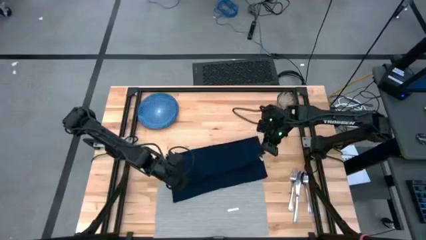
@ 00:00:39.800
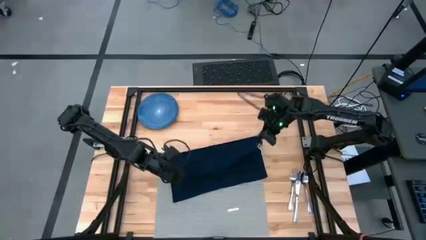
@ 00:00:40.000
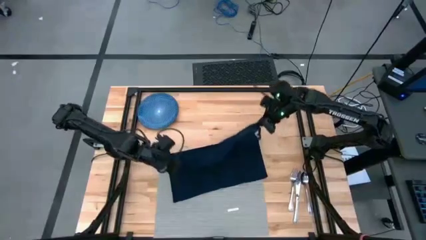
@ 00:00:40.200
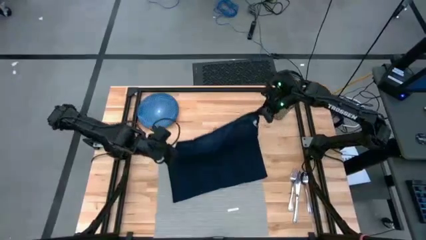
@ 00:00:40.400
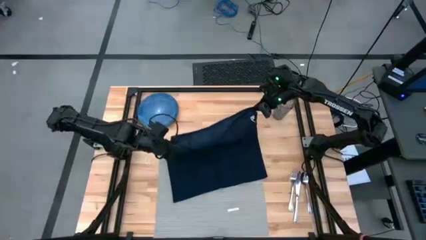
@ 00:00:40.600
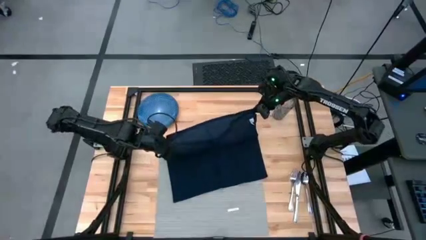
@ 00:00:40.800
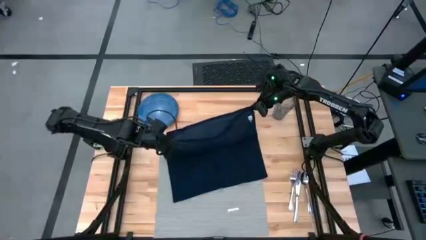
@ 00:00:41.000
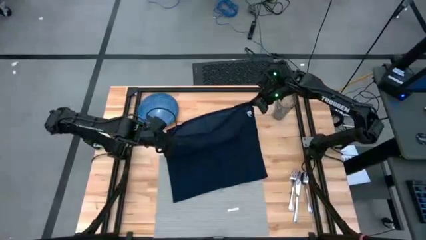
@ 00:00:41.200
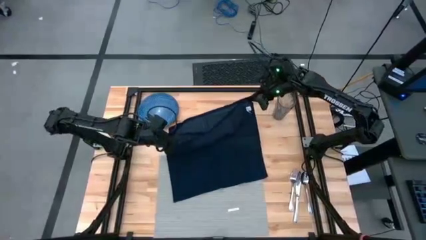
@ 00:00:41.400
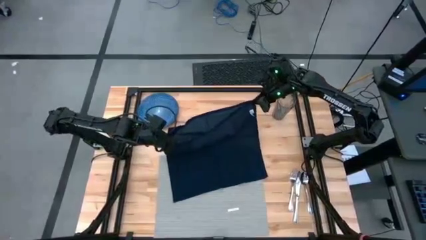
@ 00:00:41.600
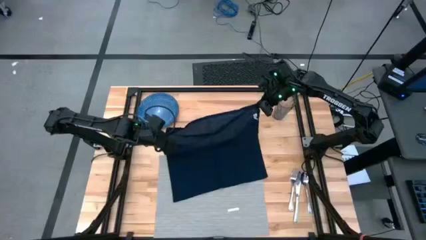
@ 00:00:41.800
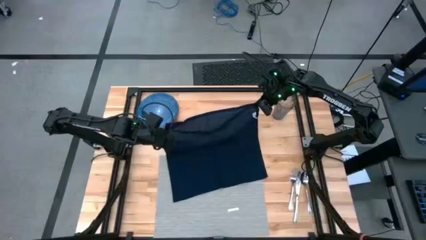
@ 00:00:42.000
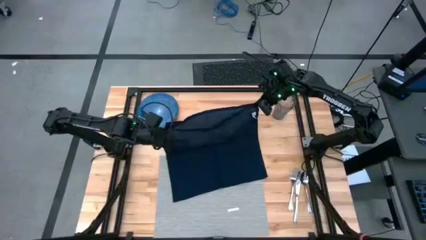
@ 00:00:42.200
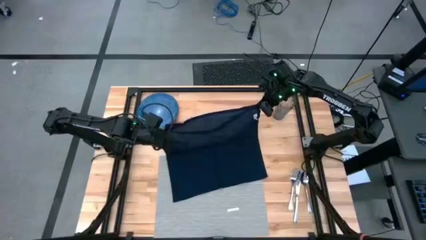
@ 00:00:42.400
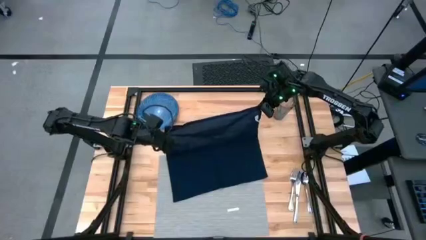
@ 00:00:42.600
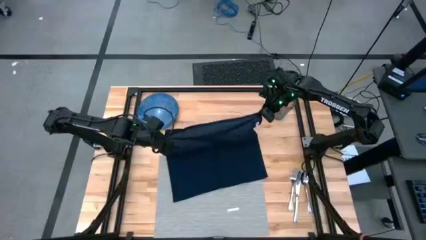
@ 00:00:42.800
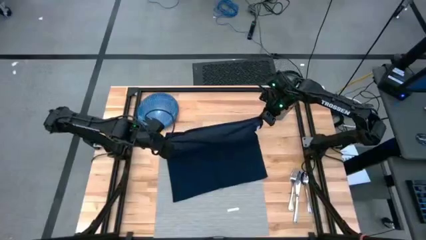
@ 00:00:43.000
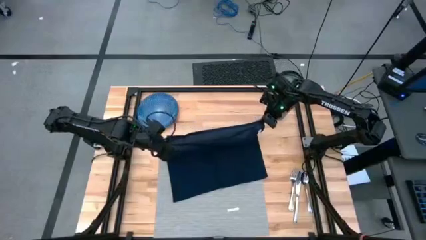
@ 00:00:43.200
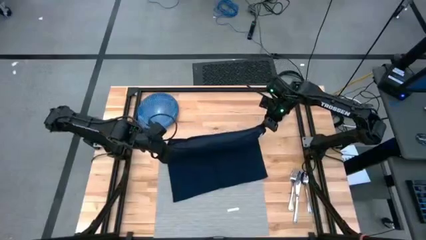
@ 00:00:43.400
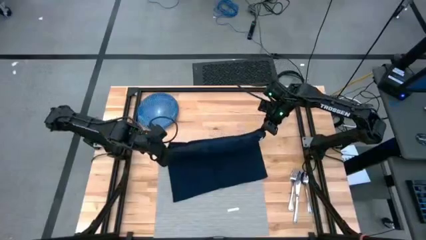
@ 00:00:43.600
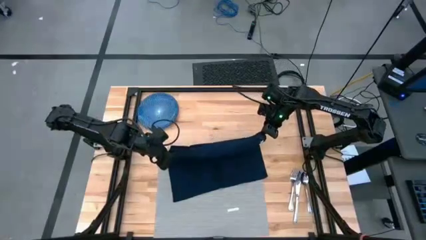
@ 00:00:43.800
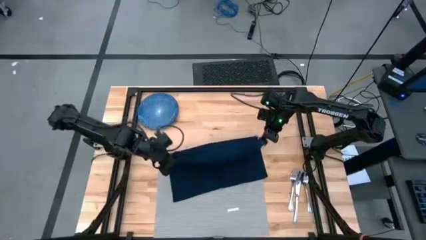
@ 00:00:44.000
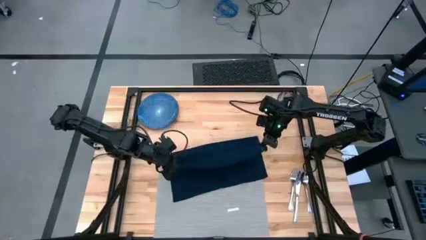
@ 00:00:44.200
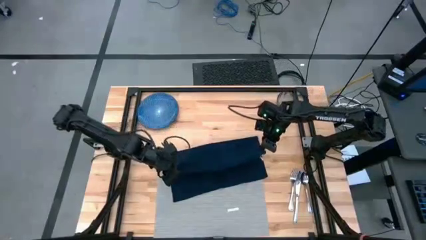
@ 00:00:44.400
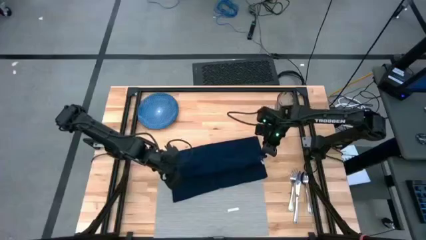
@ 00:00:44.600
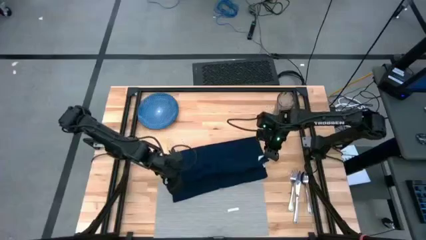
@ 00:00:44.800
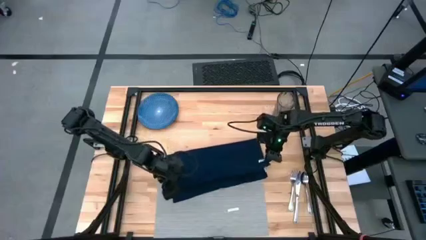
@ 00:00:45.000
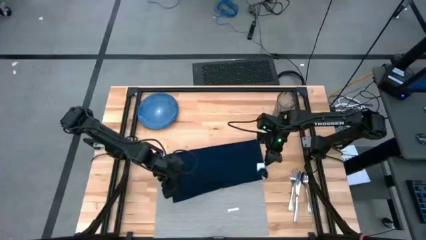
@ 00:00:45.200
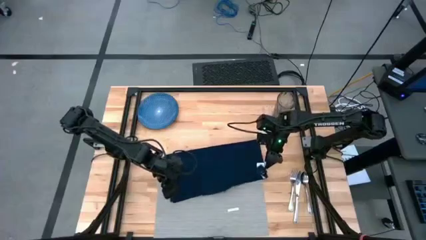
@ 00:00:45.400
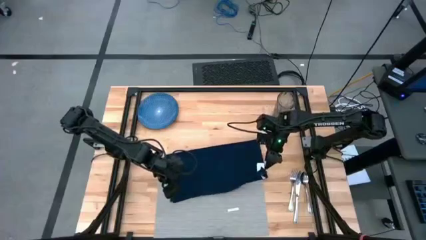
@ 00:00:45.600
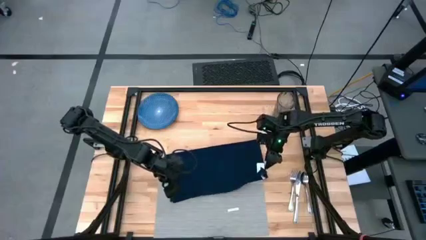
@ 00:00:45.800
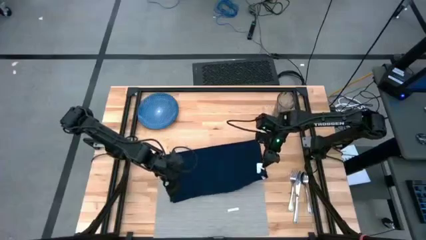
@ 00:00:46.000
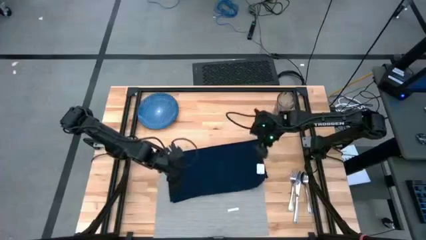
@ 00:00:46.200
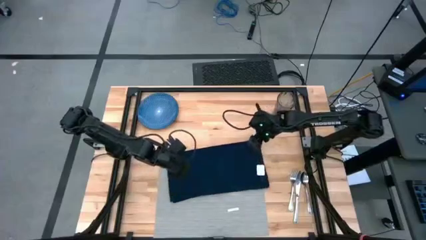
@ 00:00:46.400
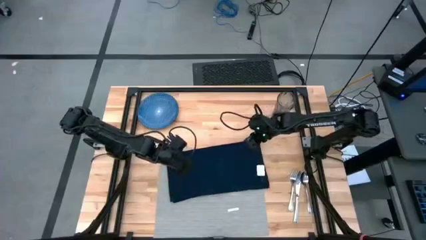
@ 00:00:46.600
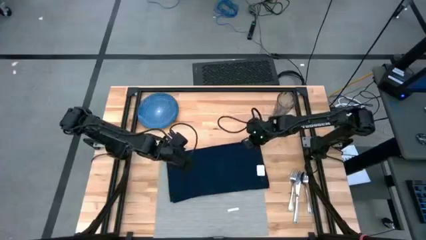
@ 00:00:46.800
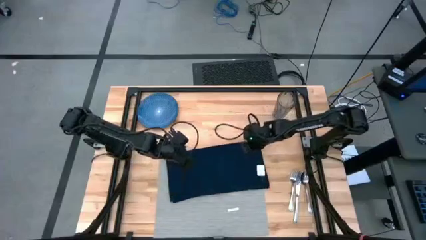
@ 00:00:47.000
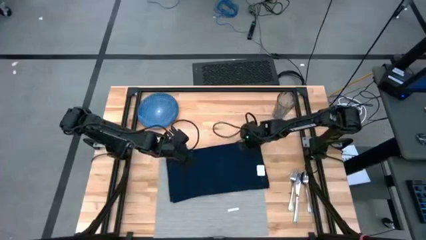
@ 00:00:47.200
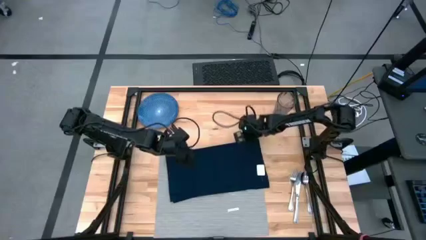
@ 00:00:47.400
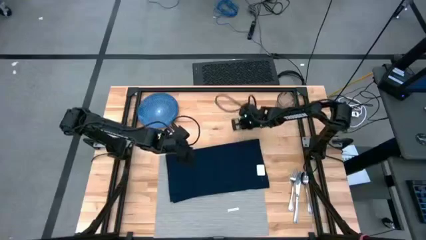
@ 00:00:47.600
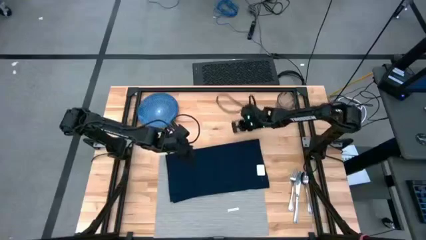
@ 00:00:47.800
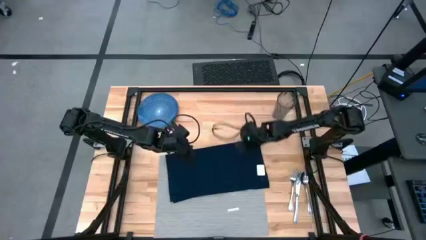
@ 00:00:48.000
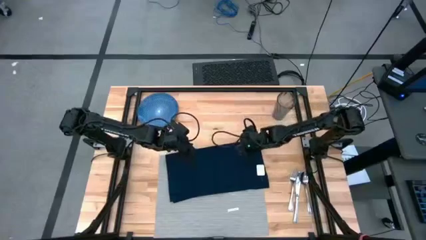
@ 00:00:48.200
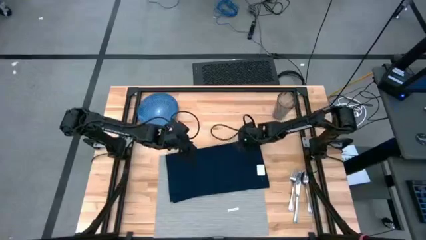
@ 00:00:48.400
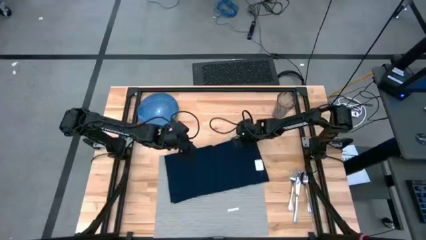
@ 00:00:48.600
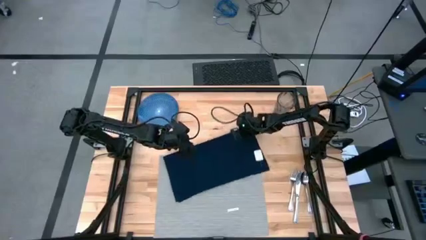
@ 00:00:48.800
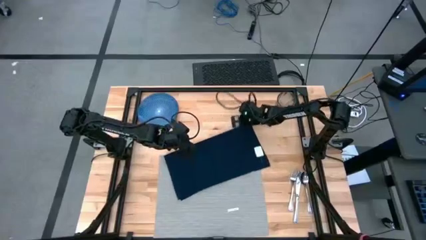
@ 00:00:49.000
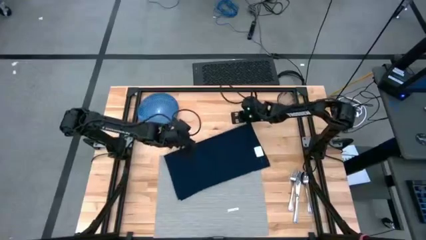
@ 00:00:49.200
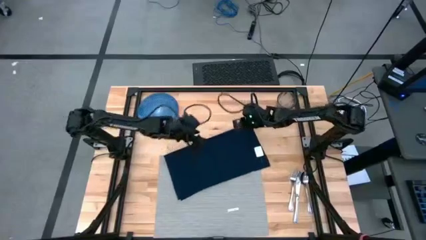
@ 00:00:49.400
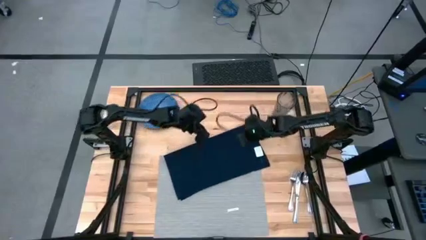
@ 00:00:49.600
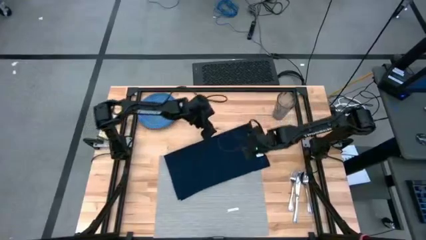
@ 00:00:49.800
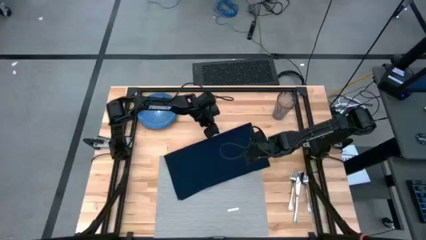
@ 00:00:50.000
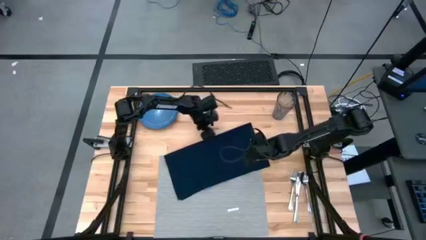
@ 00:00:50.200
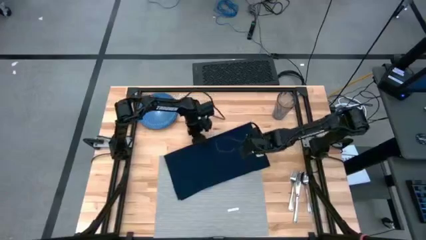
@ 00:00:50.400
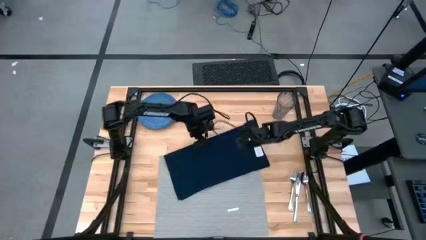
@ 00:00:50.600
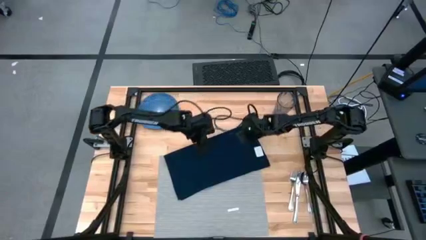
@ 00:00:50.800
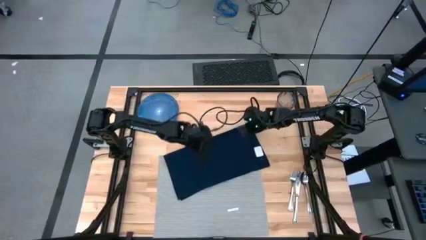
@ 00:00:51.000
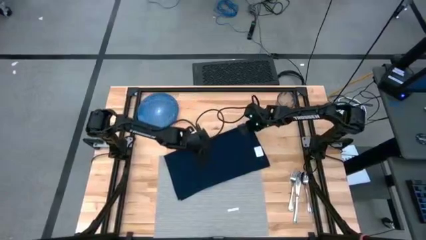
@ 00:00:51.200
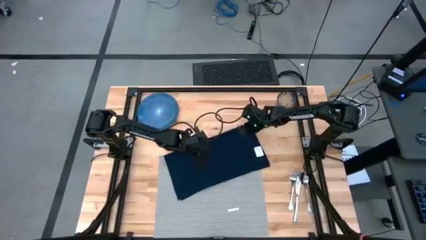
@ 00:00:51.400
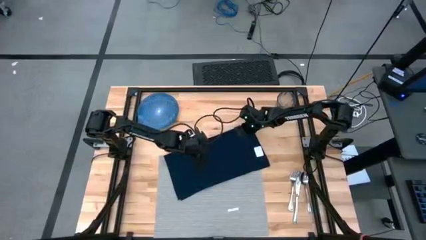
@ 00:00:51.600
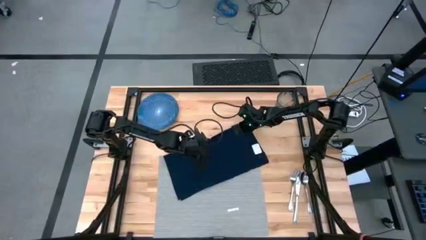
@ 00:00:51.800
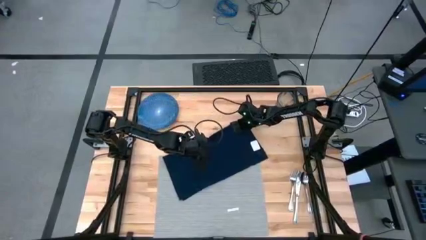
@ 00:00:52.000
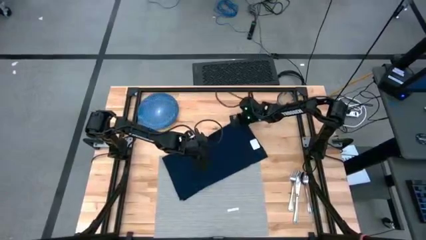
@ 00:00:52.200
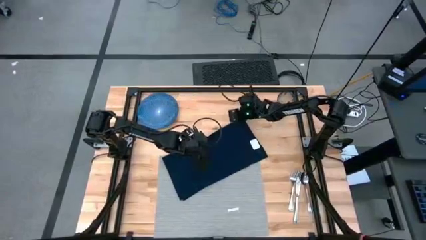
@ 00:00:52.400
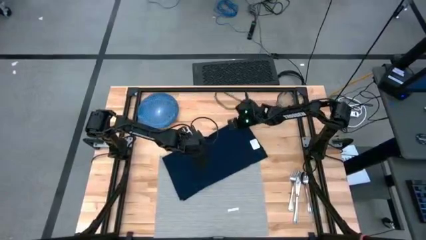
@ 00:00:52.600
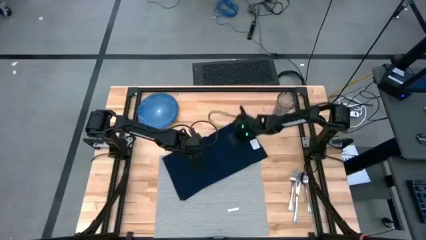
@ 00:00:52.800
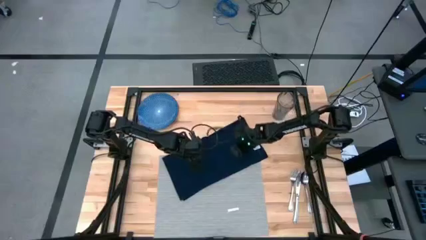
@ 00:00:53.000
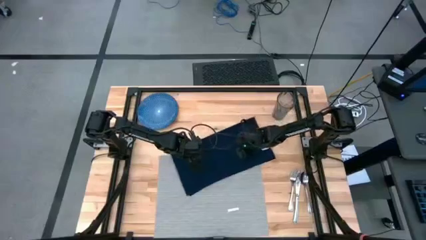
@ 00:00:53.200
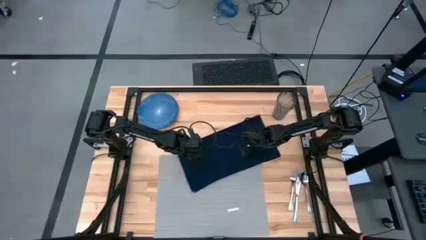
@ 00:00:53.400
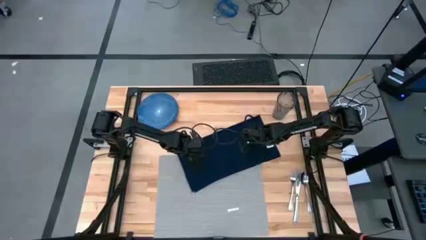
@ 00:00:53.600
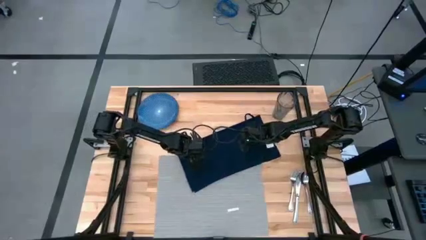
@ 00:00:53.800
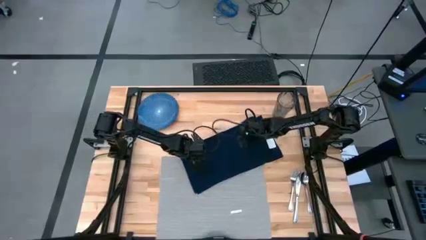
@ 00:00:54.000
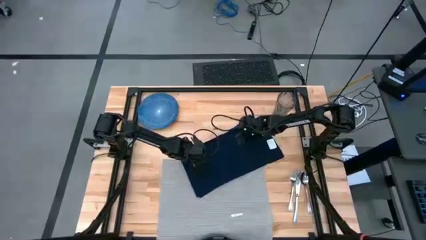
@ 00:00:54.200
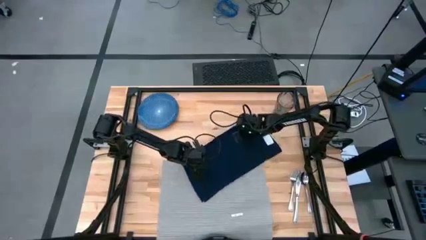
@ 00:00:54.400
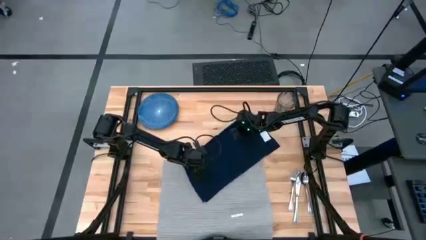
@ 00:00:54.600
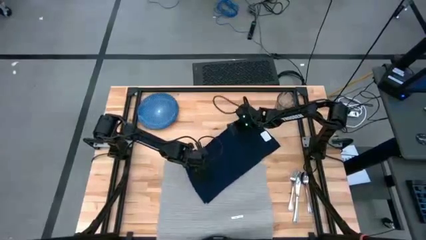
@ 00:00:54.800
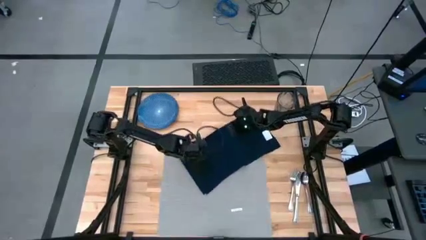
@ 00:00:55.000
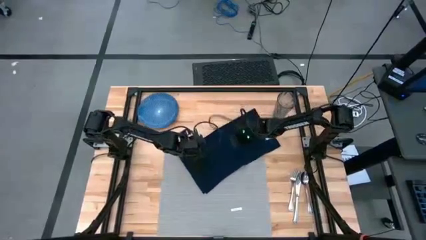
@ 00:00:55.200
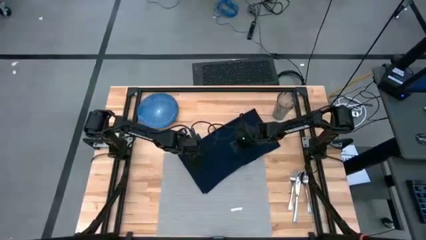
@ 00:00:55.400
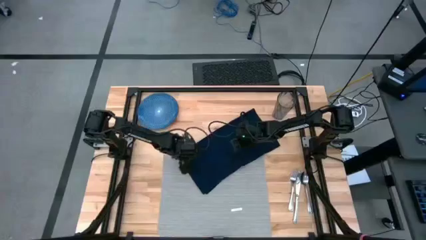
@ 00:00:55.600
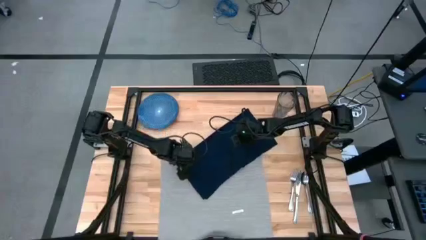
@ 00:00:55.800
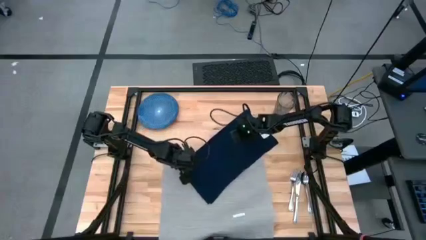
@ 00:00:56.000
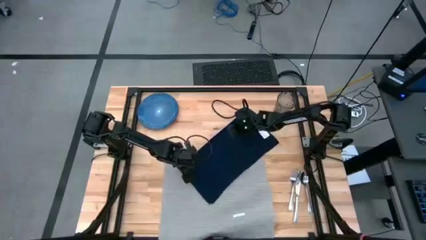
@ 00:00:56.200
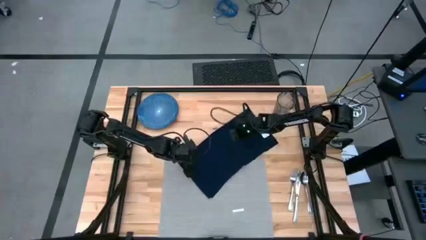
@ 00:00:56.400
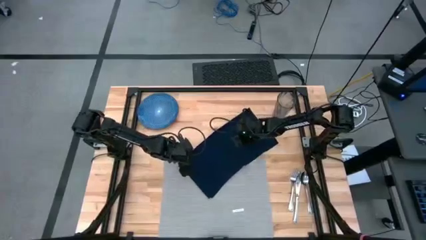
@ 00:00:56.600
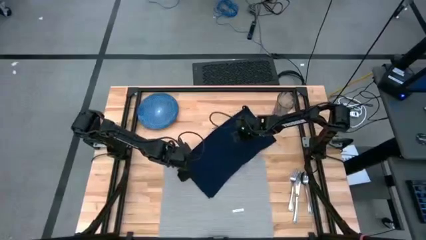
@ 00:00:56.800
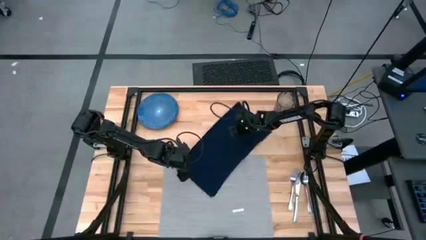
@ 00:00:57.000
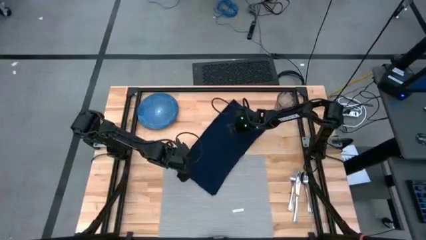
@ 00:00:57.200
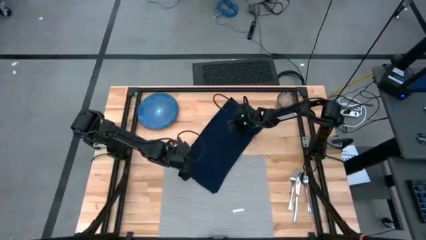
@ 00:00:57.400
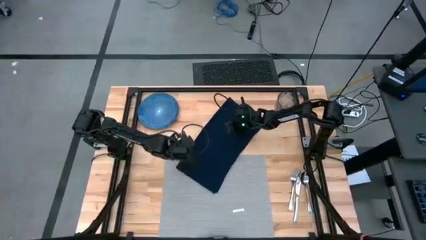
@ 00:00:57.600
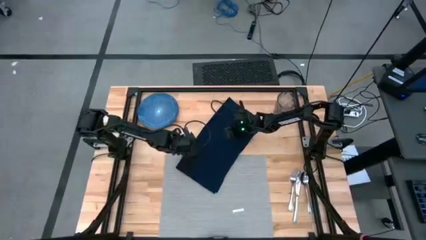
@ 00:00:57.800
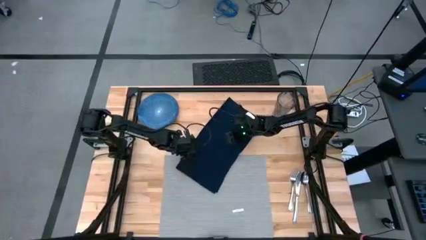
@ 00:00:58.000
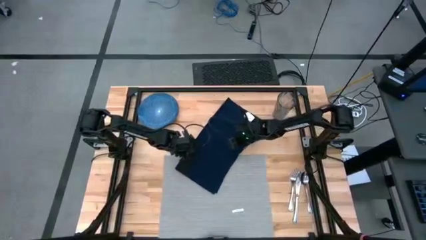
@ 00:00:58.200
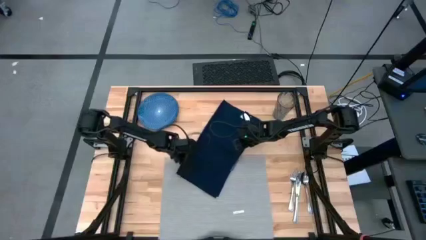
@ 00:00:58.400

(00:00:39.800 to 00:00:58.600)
Task: Set table place
Fold the dark blue napkin
